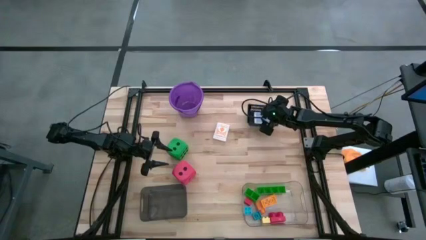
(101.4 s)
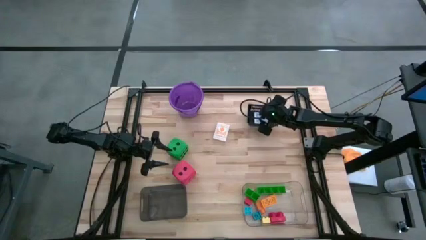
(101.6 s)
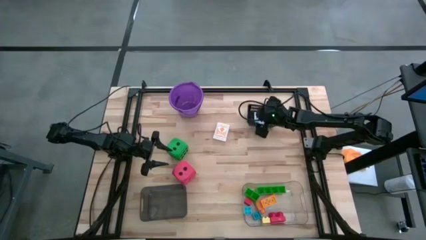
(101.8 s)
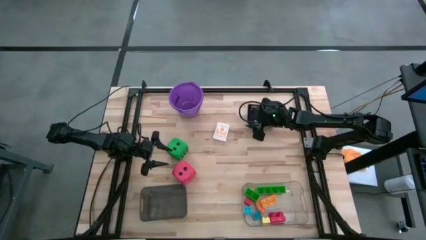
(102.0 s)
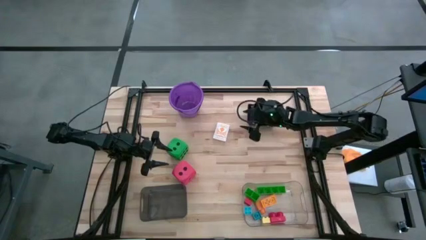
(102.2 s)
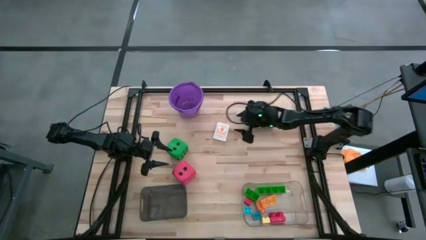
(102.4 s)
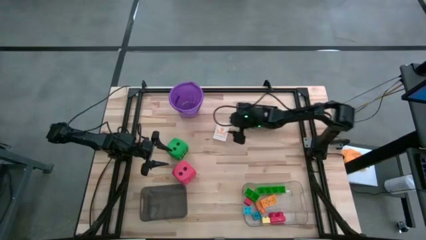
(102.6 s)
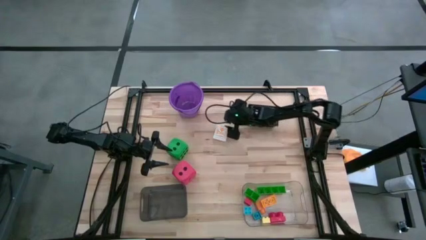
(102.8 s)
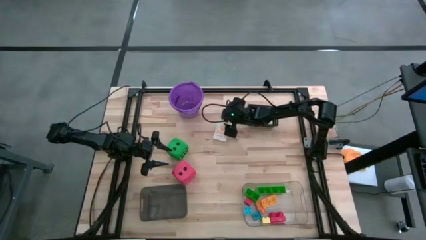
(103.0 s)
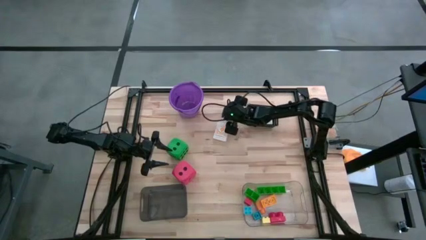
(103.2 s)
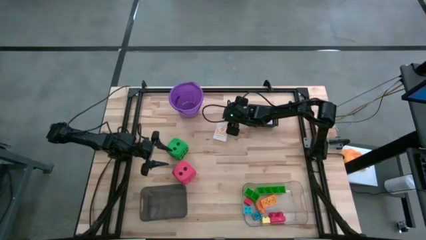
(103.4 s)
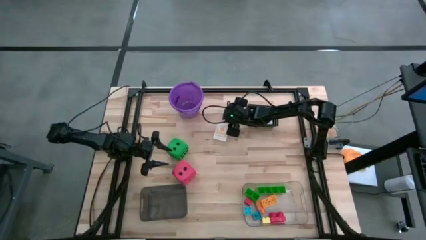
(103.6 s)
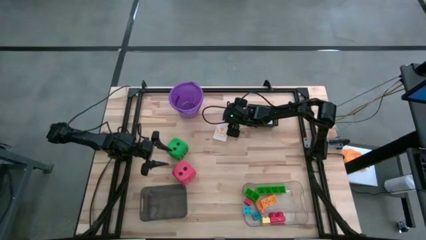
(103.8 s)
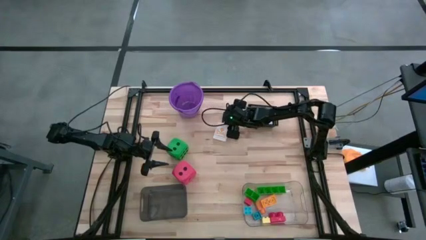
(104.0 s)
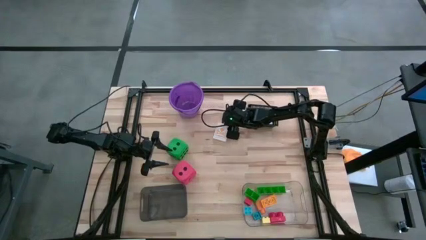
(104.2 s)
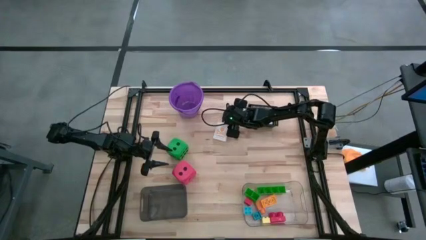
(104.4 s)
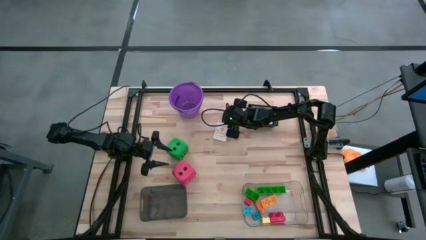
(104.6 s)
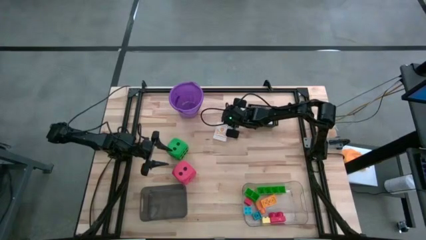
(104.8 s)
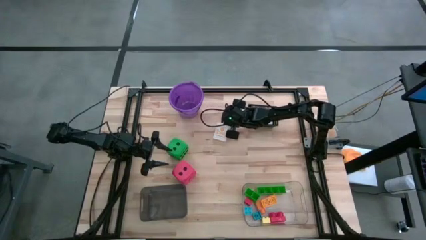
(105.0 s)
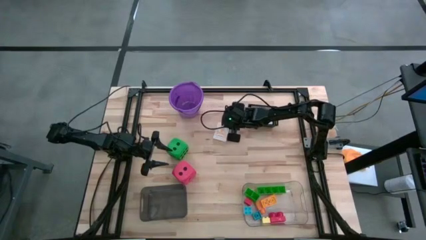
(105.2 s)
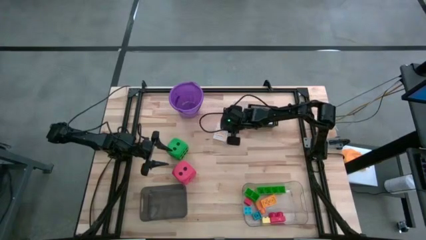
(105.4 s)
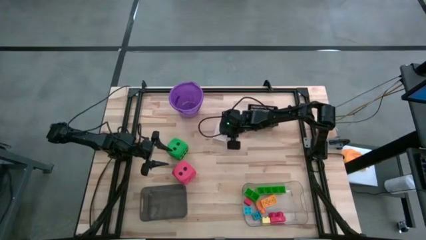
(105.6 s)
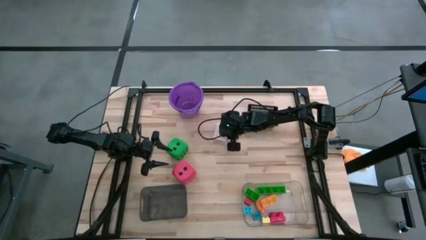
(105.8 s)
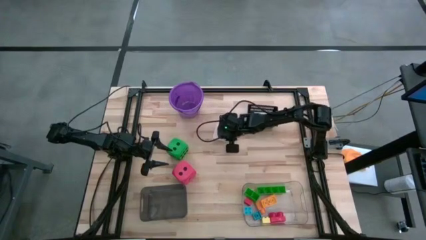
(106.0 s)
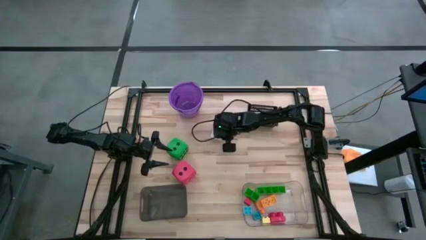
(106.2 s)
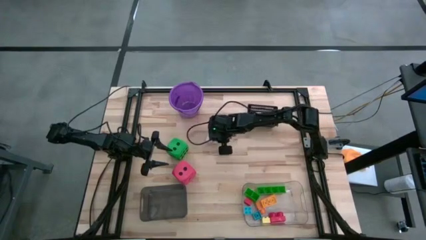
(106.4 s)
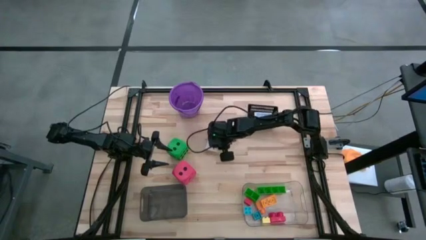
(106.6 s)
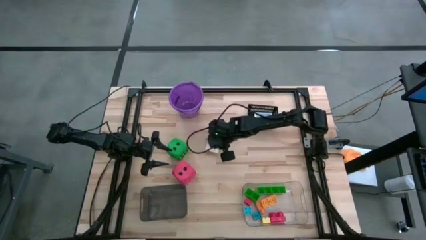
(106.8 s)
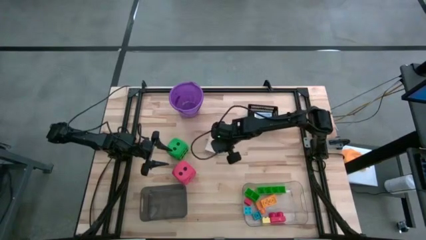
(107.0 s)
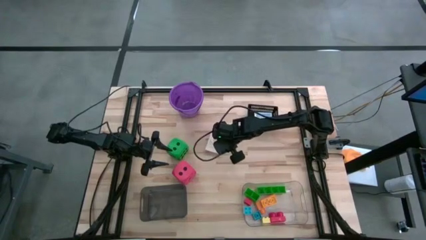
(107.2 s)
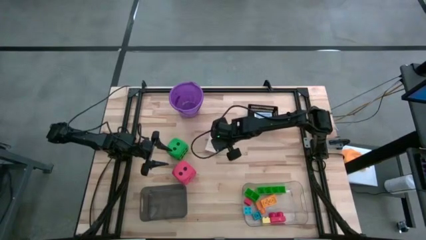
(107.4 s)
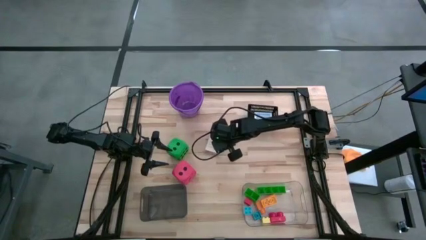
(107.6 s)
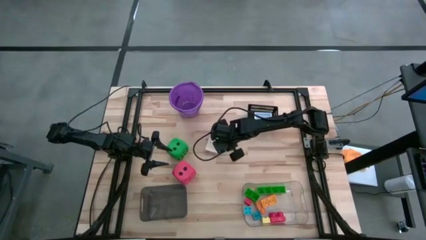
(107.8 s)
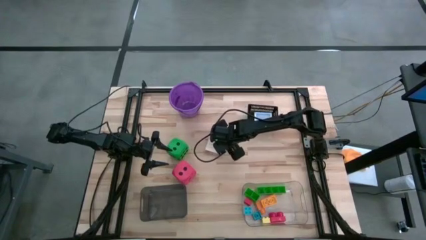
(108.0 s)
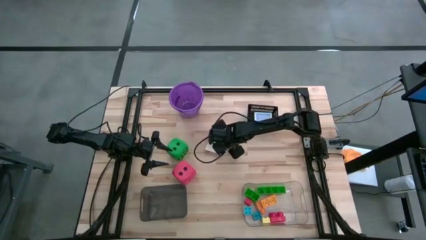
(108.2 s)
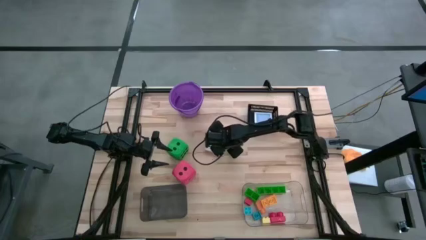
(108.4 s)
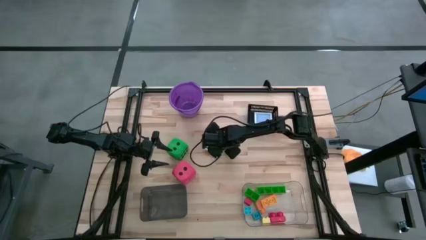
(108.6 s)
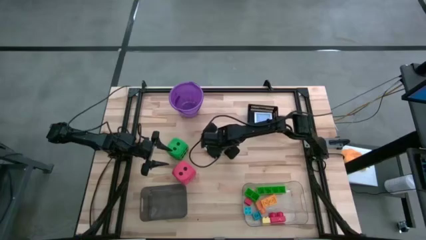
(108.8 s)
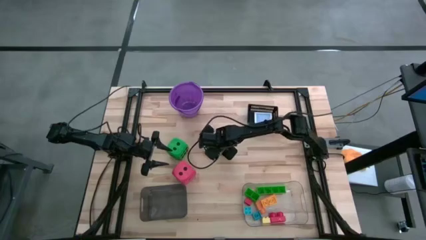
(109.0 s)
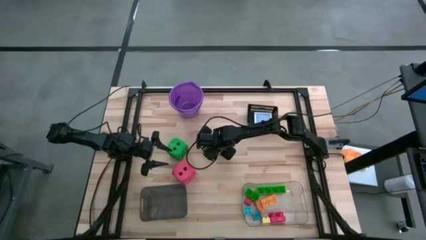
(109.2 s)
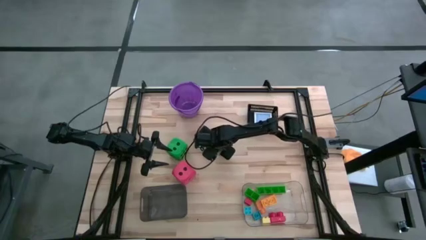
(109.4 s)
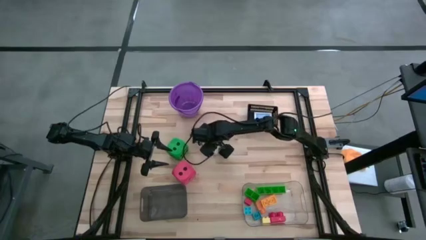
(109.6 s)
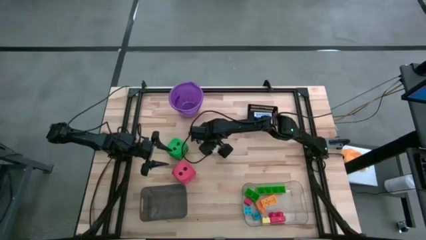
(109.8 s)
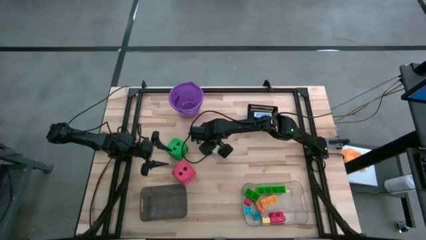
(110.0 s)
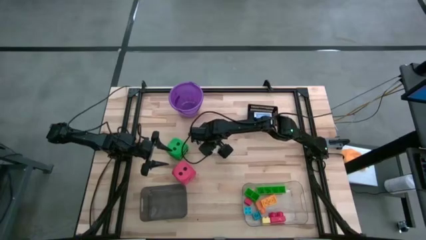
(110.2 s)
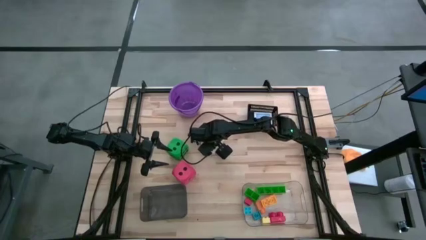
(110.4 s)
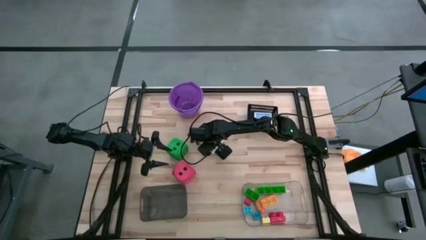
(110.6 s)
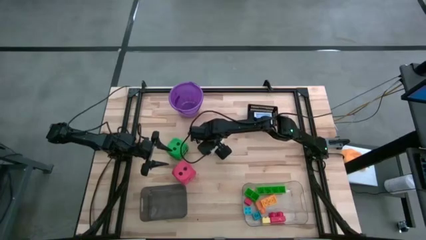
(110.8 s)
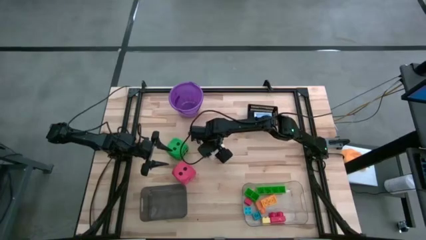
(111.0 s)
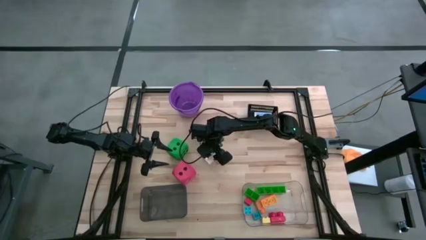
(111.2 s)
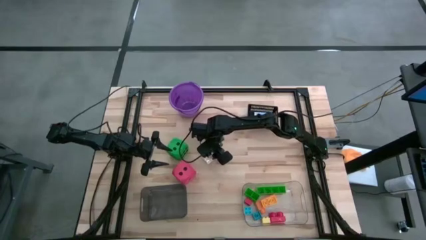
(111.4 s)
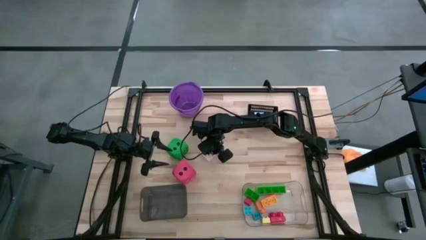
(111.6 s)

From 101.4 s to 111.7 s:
Task: Pick & Place Toys
Put the yellow deck of cards into the black basket

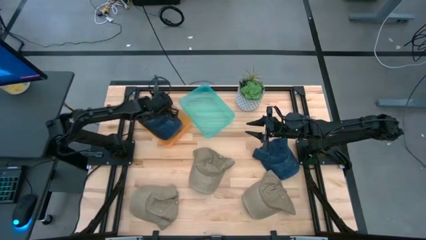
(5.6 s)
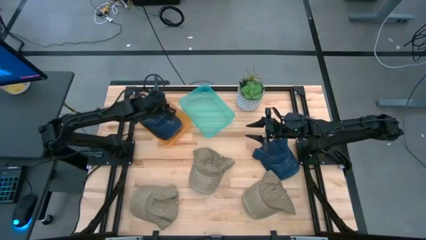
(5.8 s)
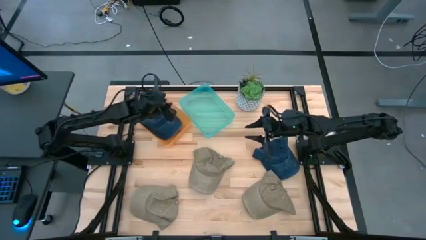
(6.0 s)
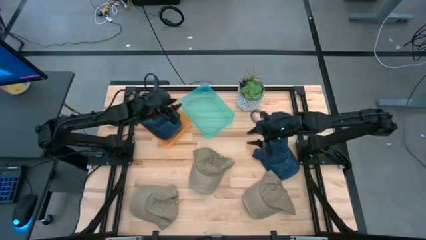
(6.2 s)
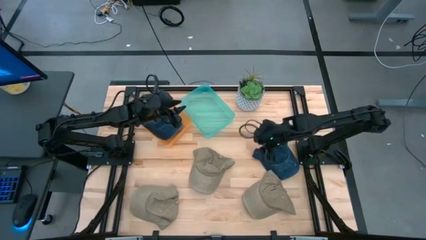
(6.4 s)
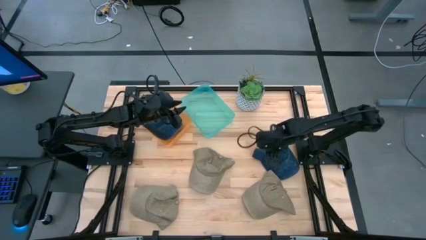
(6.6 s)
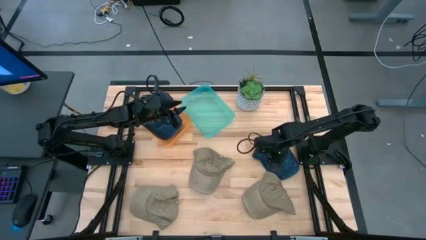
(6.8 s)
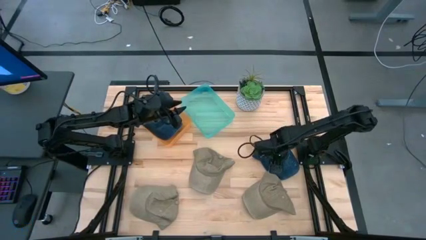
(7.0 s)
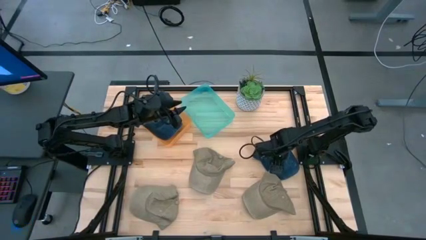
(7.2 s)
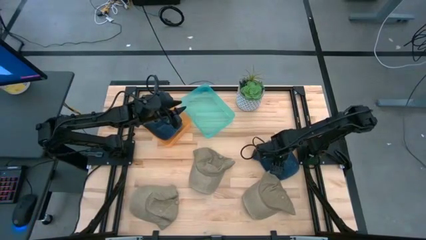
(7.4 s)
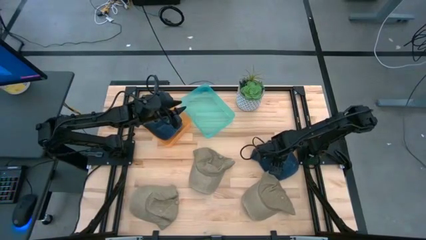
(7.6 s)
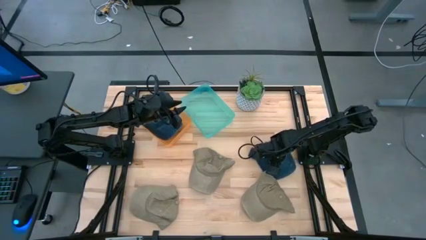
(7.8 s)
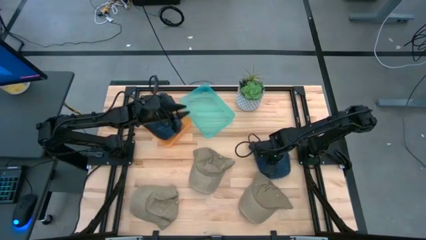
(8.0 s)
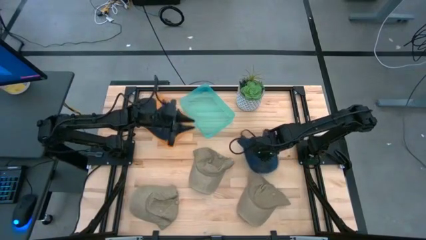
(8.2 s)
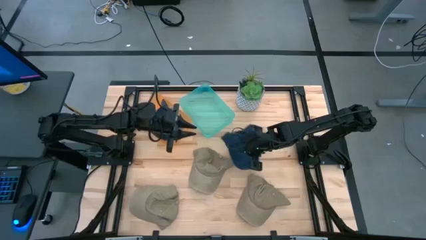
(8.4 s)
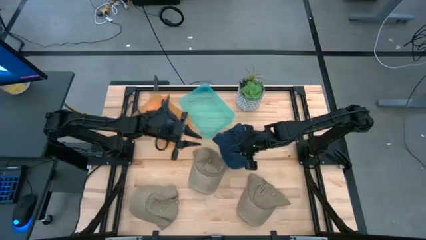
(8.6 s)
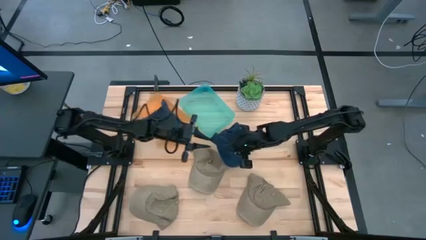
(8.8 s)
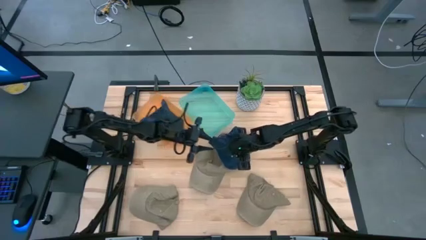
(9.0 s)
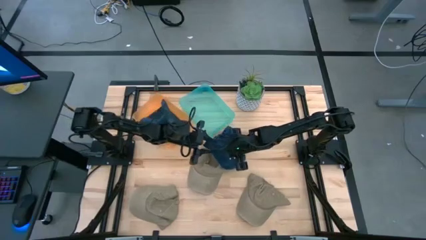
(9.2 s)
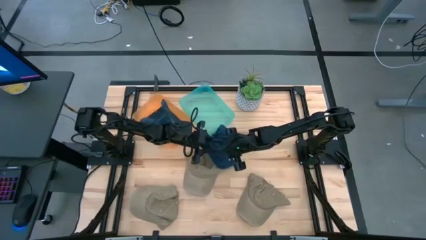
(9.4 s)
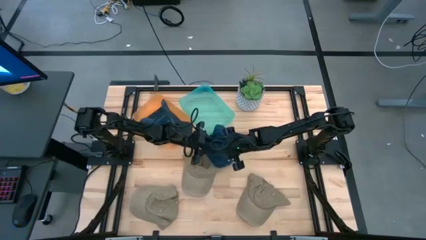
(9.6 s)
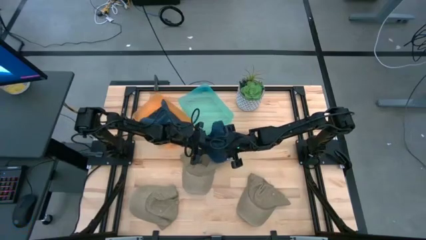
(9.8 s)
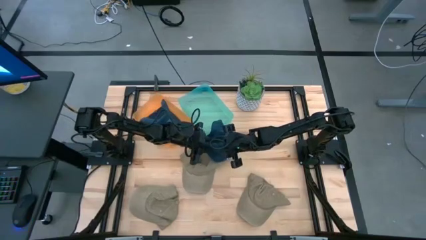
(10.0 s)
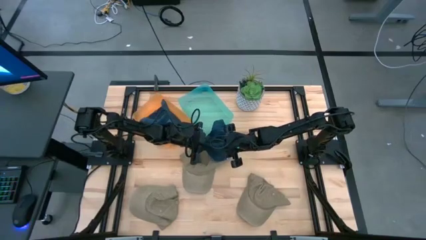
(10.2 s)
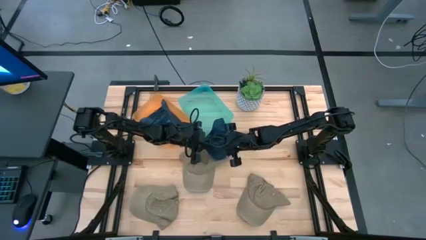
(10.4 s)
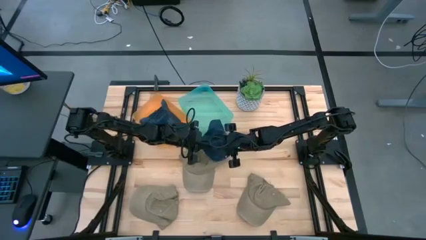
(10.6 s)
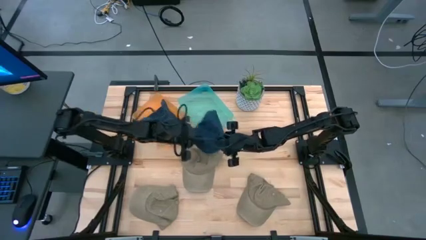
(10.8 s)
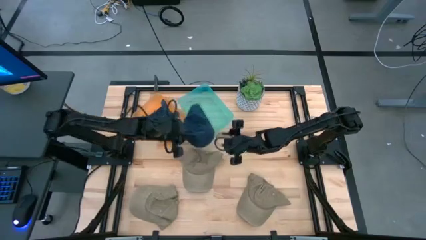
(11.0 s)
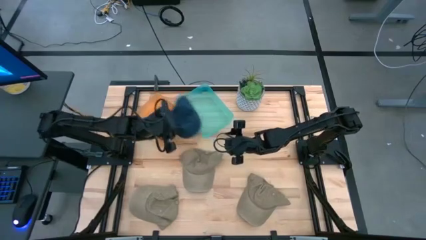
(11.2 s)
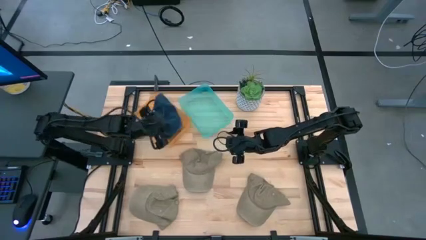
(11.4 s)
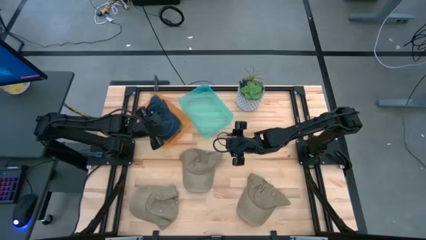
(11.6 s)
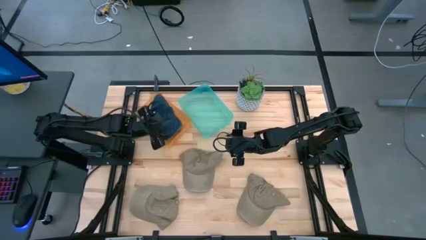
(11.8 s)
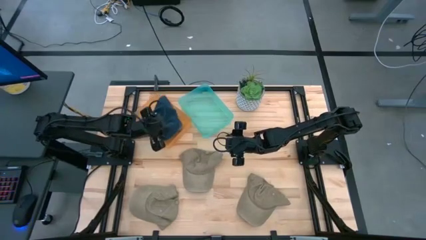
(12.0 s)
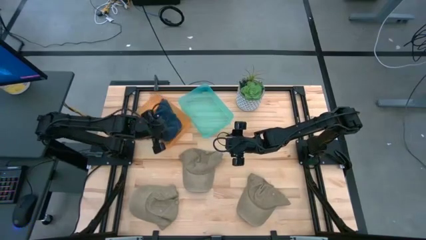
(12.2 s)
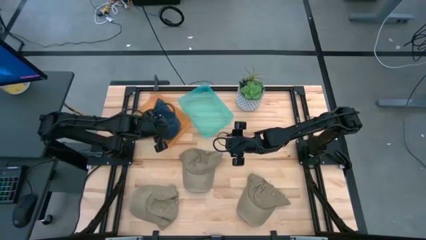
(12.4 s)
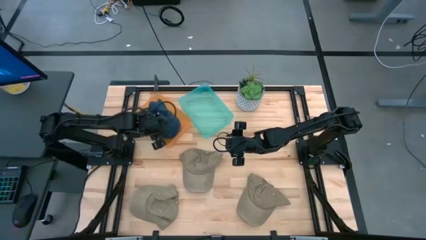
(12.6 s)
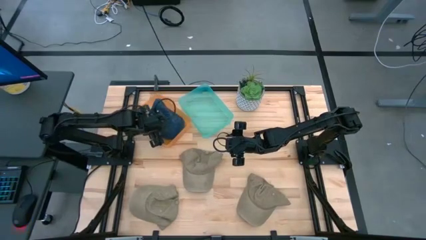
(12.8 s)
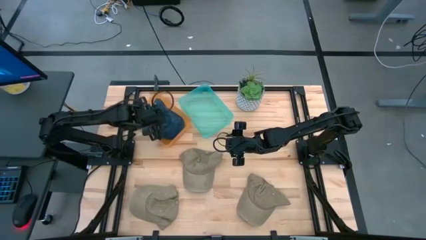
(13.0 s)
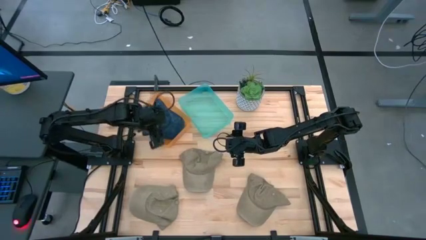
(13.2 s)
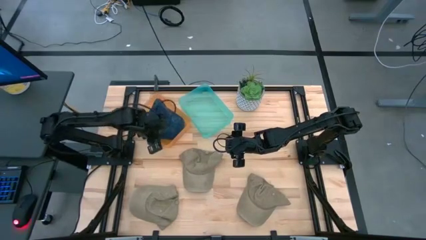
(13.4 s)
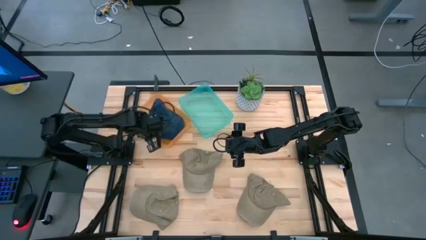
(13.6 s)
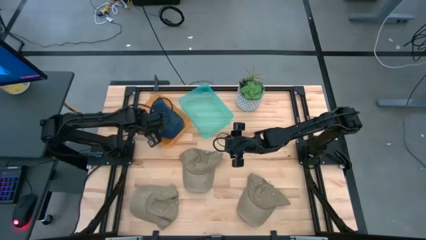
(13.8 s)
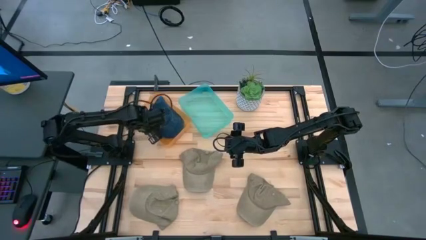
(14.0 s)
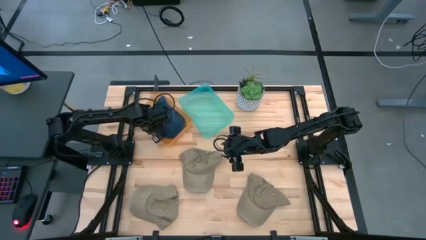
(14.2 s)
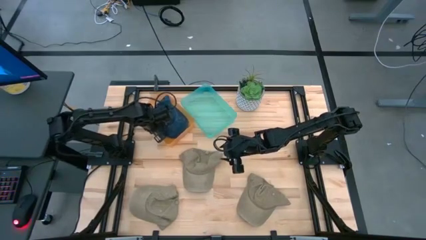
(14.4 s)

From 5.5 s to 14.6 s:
Task: Pick & Place hat
Put the blue cap into the orange bin
